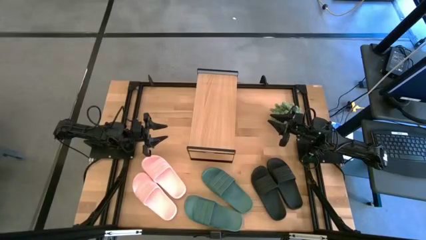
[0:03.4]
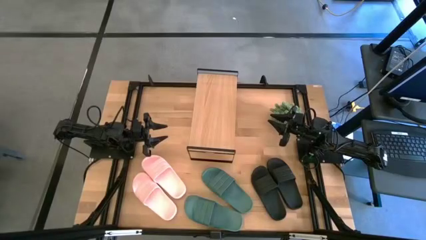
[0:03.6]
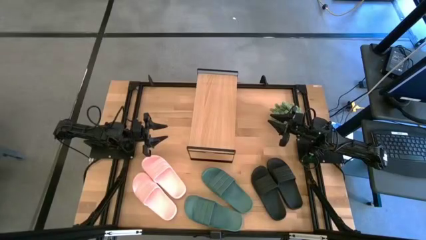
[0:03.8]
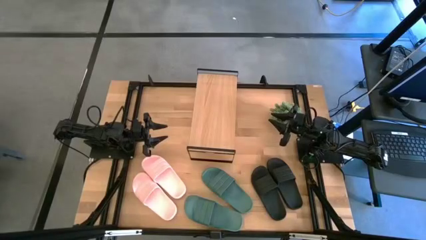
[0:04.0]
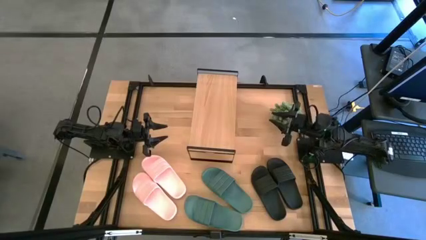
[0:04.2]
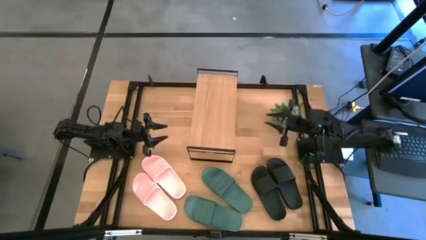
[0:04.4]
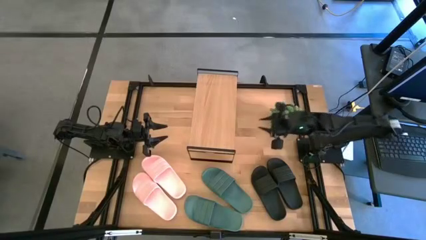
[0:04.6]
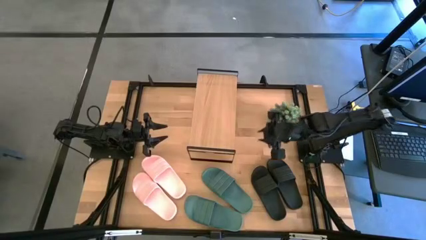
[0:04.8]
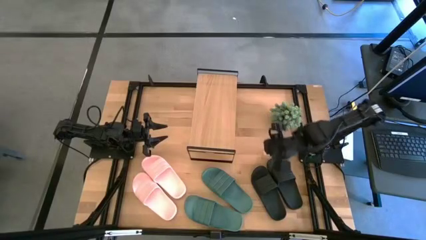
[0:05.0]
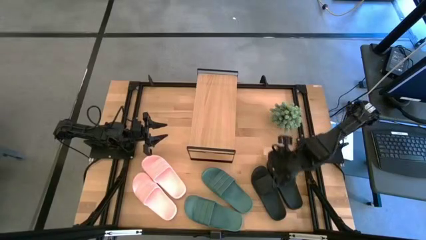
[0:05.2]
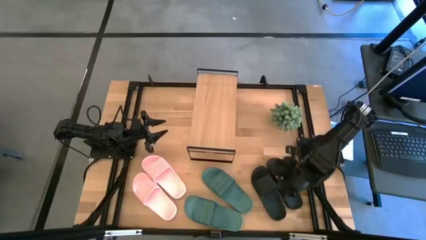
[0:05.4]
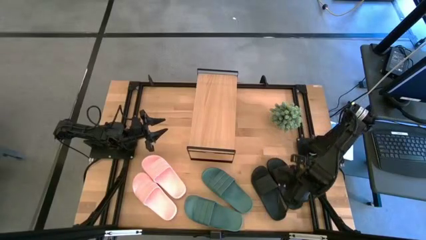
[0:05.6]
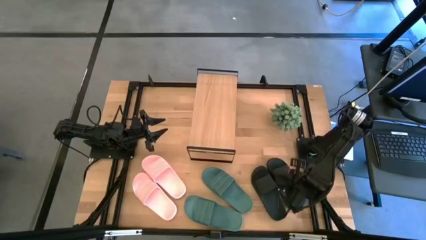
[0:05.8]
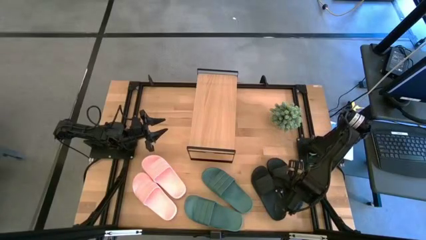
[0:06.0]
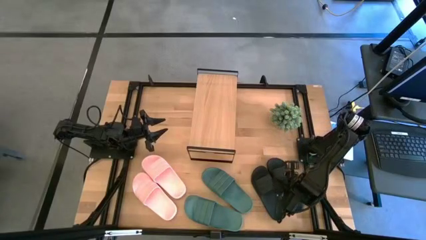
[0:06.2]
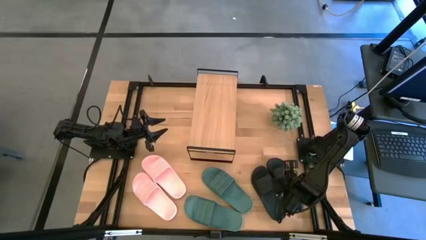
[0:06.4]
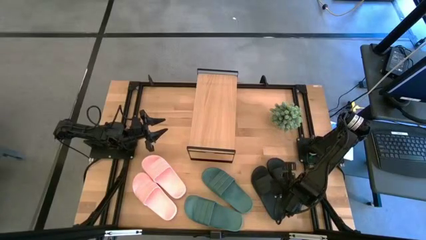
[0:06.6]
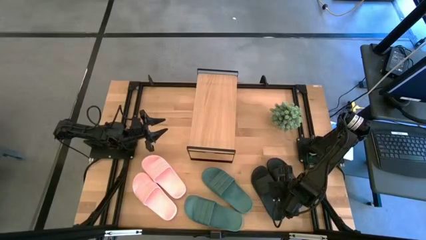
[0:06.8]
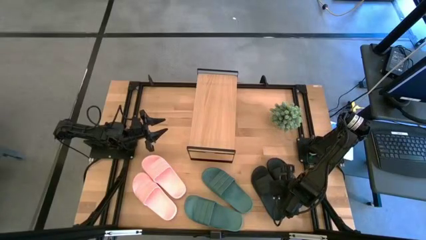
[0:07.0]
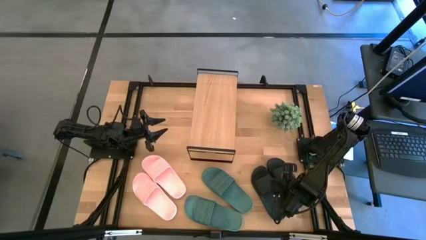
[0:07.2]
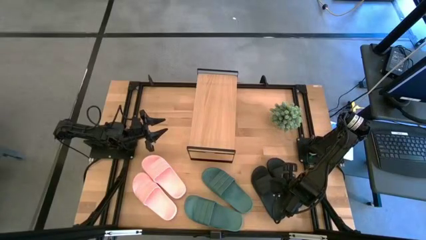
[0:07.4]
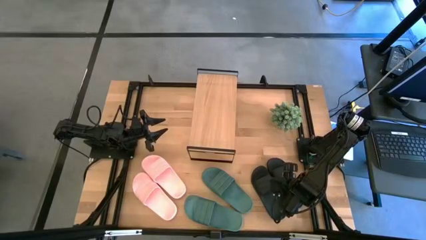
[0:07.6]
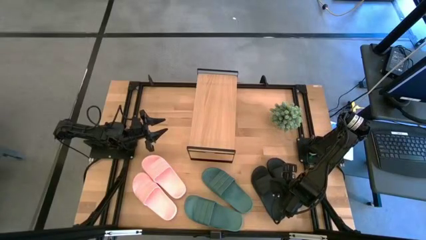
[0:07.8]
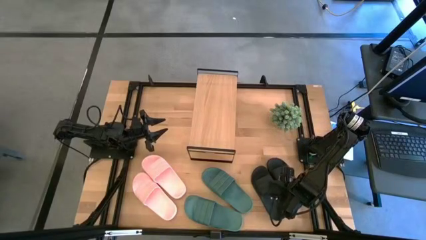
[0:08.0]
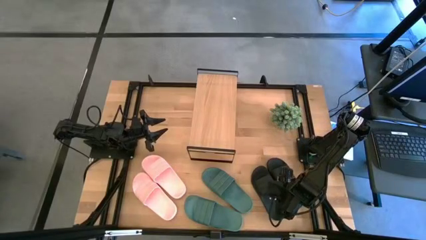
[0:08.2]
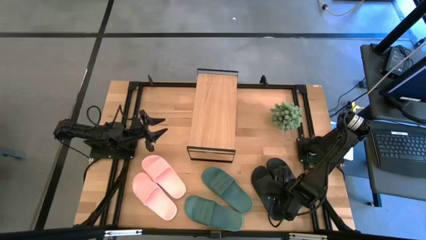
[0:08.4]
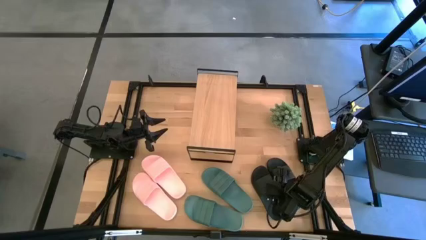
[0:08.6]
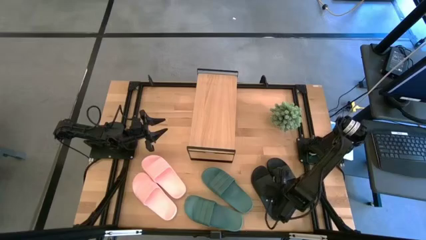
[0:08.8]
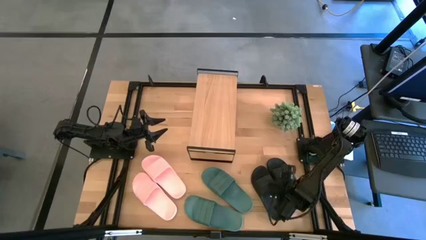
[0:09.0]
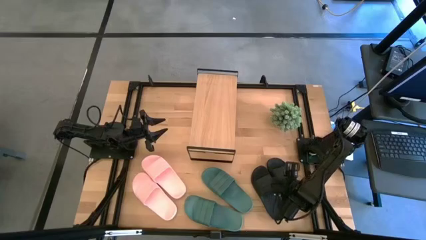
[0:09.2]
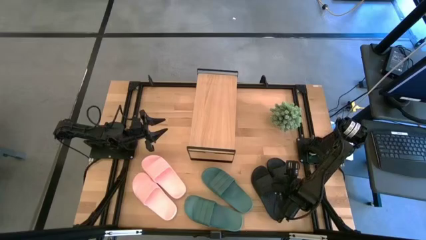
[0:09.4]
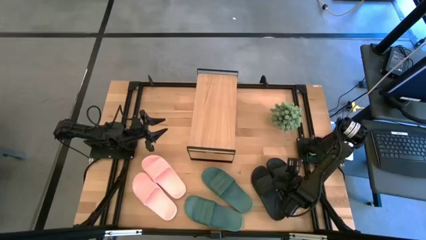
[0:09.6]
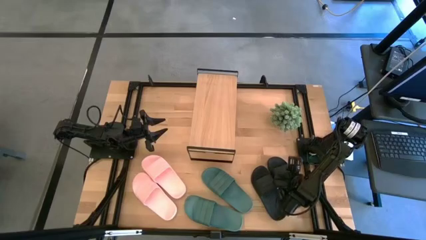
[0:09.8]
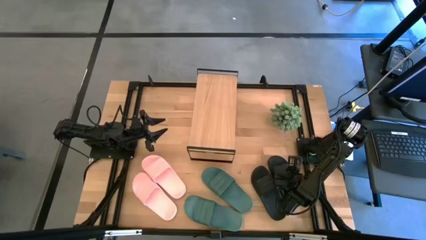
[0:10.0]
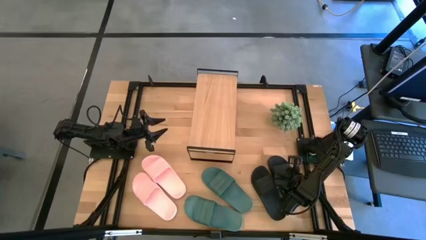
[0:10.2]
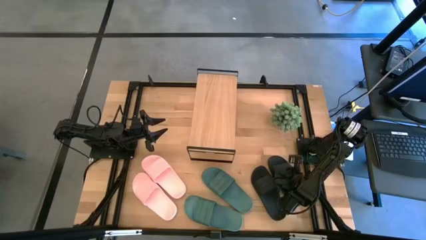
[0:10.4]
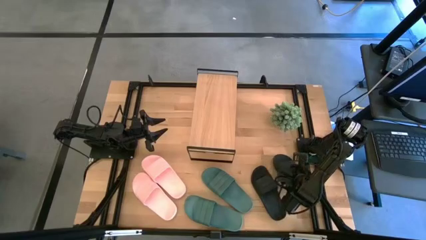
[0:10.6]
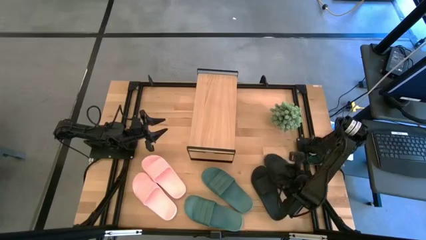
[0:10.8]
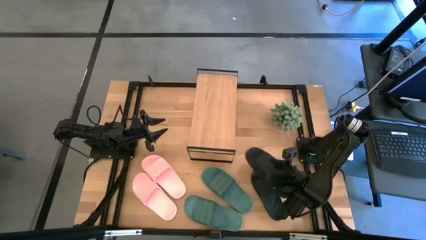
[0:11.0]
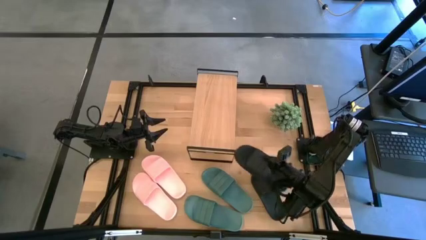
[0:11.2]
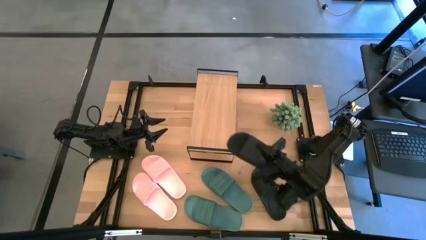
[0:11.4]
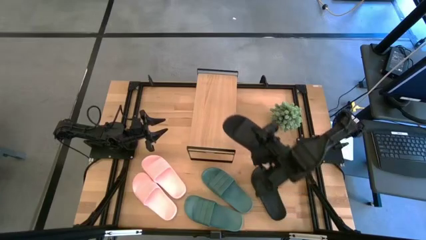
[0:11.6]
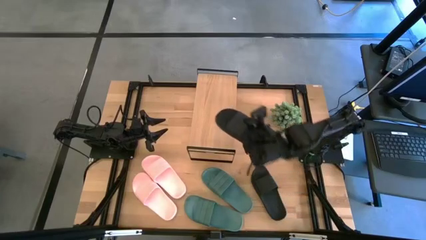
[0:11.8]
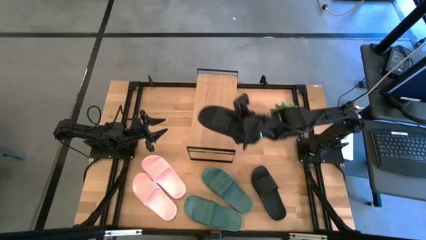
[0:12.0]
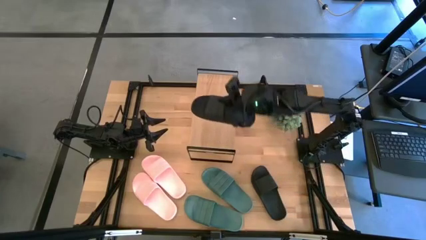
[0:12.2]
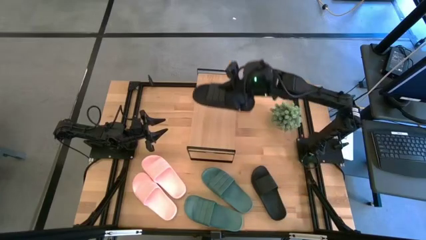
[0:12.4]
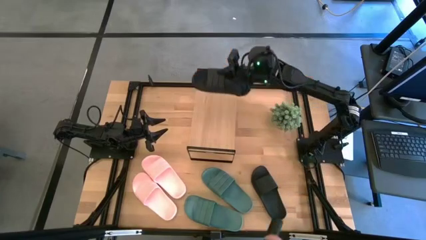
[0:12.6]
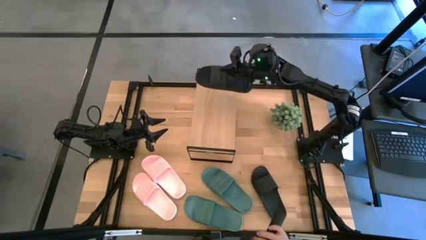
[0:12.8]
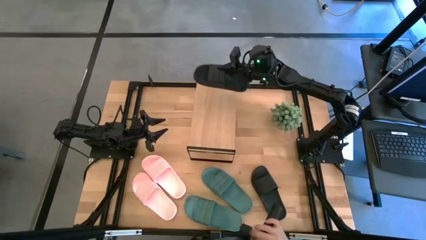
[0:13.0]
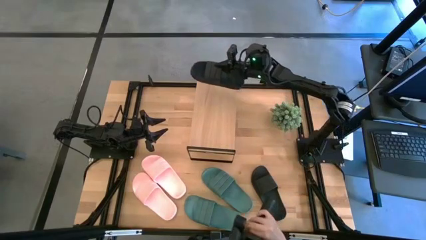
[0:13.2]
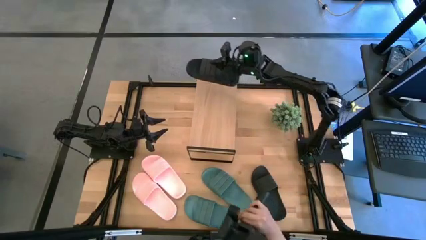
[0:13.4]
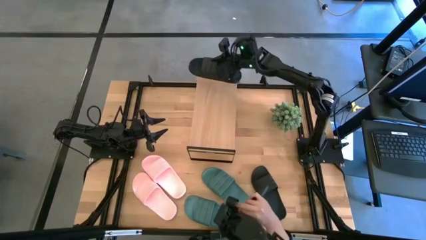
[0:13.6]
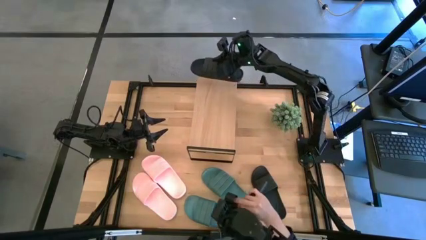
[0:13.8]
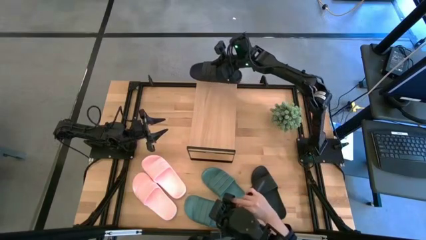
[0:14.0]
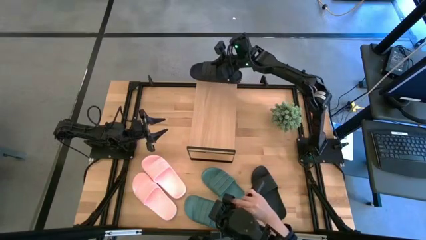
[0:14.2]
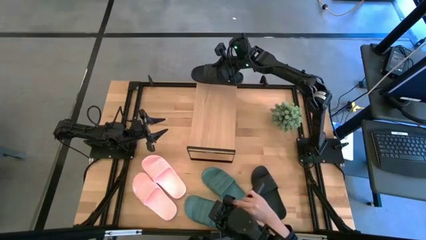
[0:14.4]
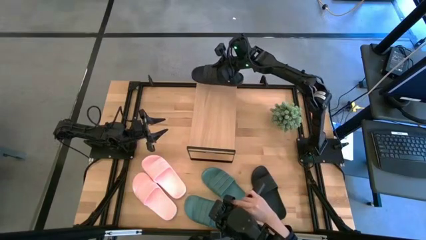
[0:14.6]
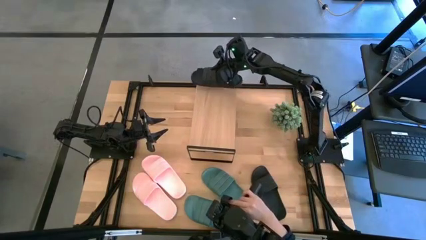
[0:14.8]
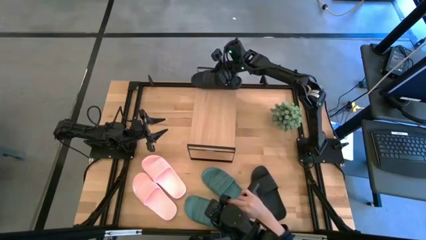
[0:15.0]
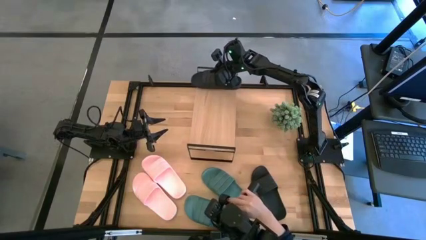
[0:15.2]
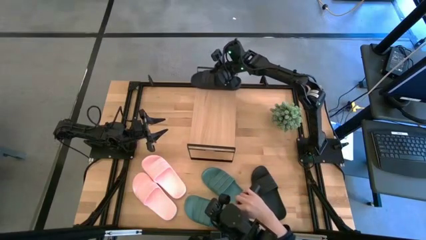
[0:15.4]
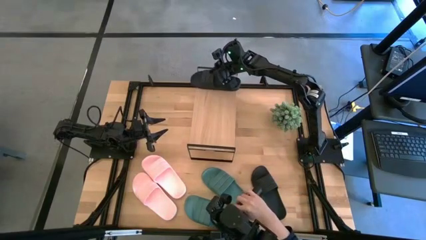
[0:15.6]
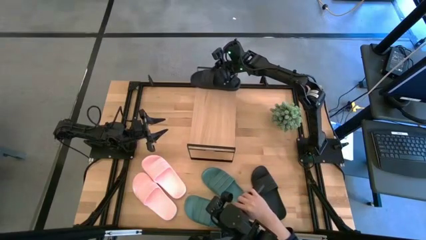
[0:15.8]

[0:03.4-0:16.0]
Task: Pick and place slides into the shelf
Put the right black slipper on the shelf
